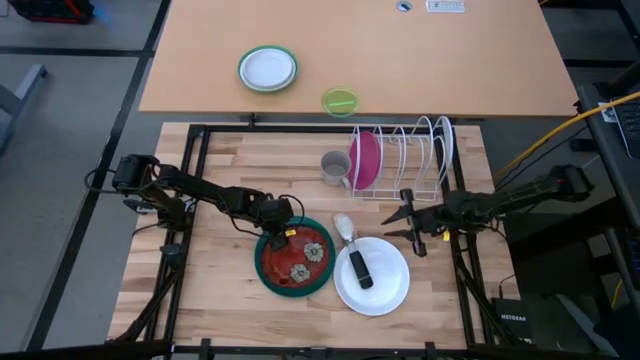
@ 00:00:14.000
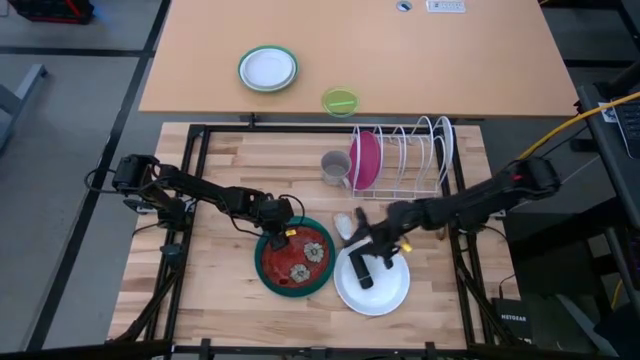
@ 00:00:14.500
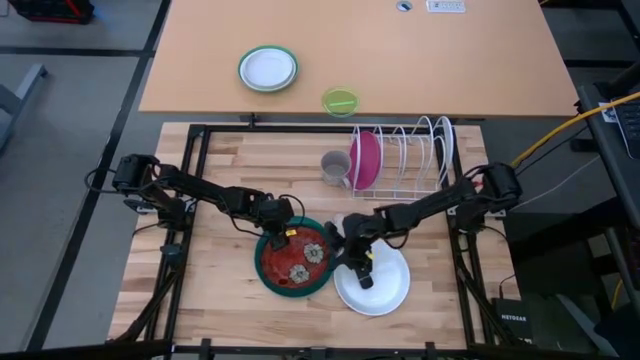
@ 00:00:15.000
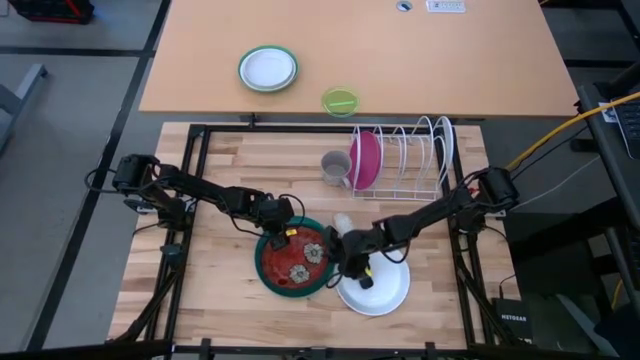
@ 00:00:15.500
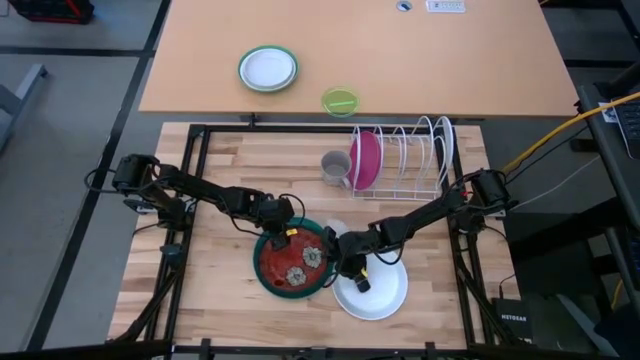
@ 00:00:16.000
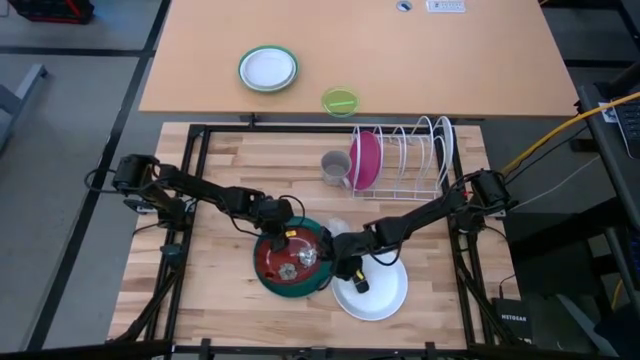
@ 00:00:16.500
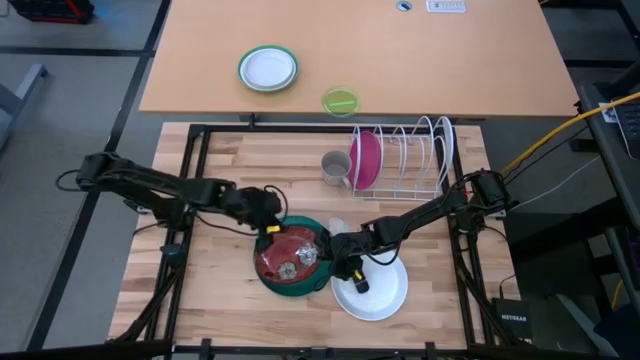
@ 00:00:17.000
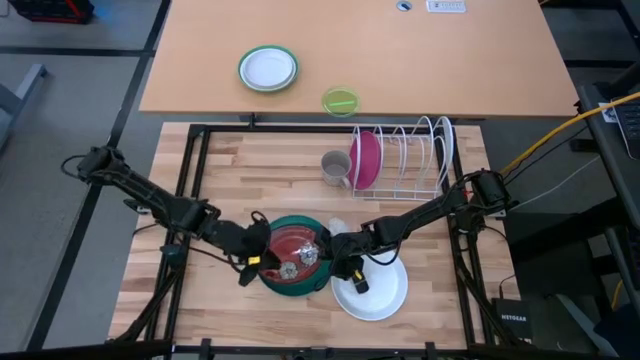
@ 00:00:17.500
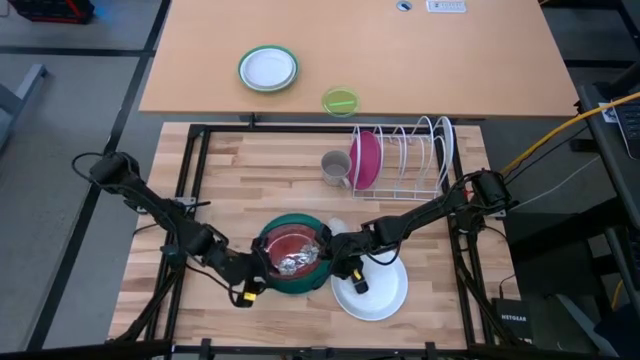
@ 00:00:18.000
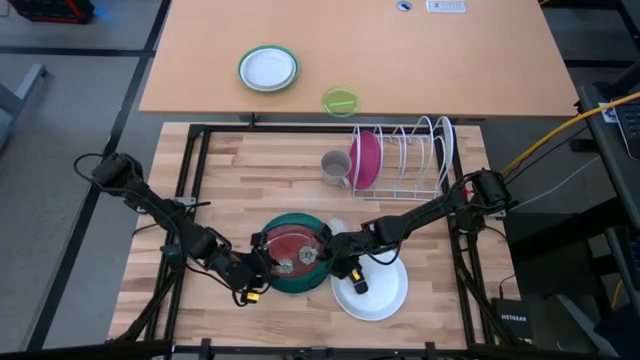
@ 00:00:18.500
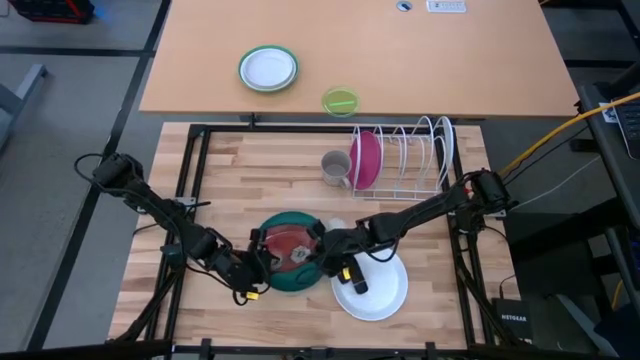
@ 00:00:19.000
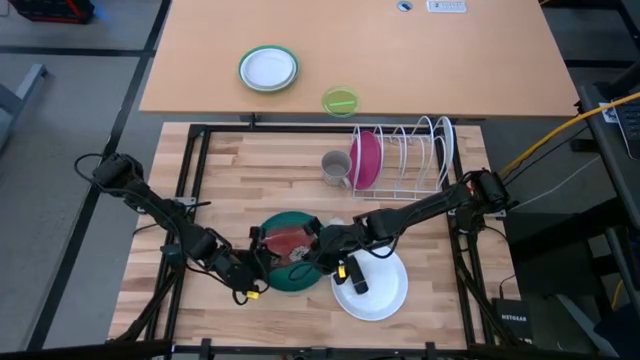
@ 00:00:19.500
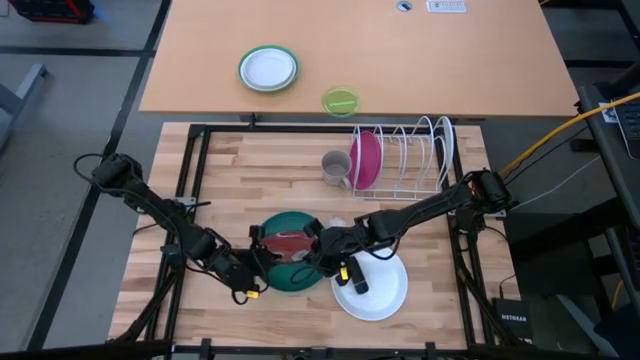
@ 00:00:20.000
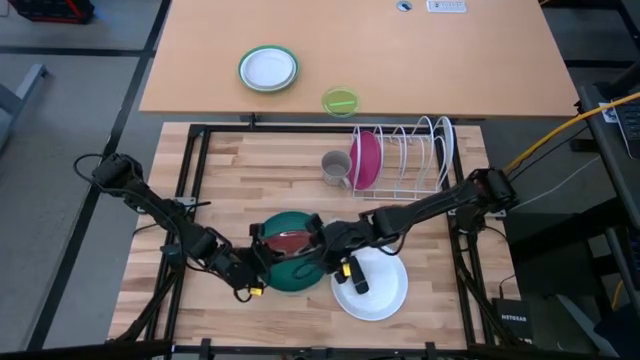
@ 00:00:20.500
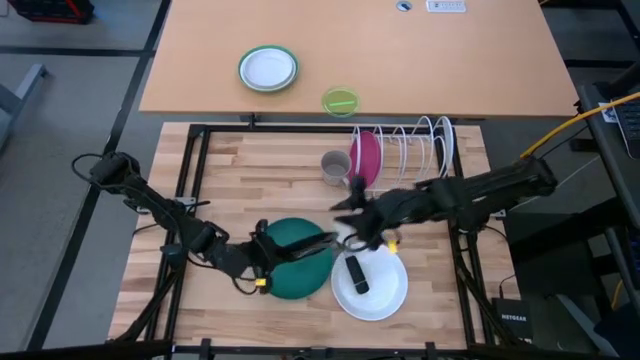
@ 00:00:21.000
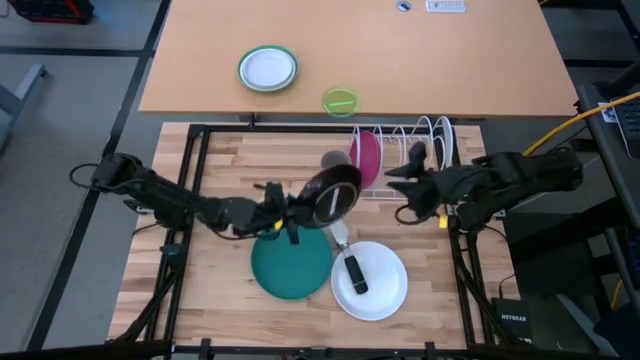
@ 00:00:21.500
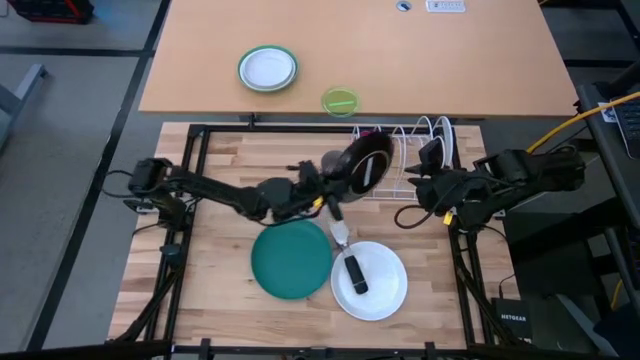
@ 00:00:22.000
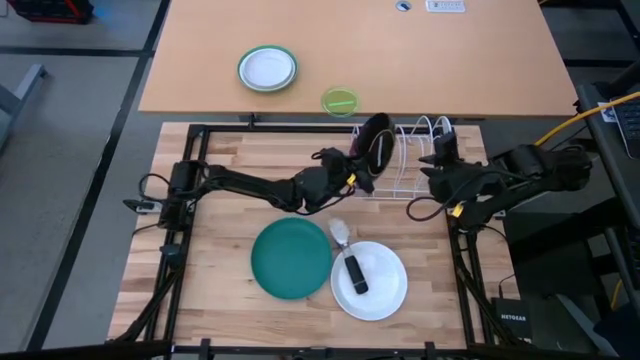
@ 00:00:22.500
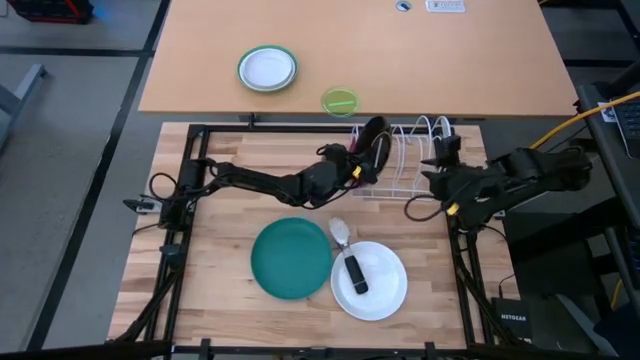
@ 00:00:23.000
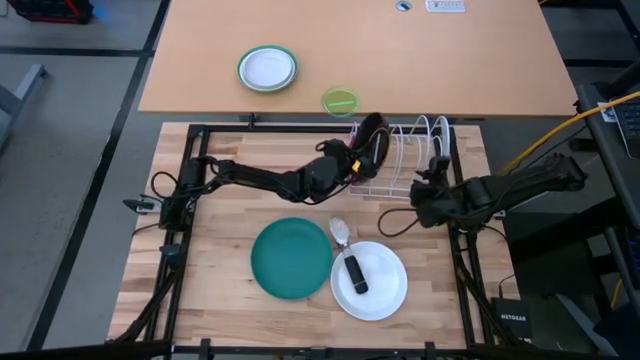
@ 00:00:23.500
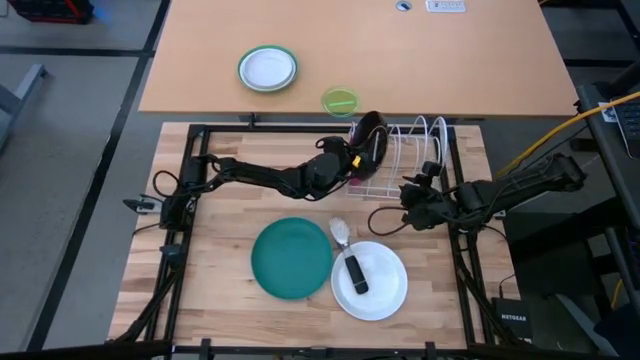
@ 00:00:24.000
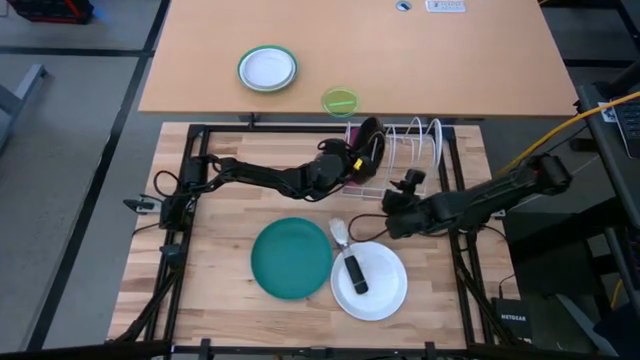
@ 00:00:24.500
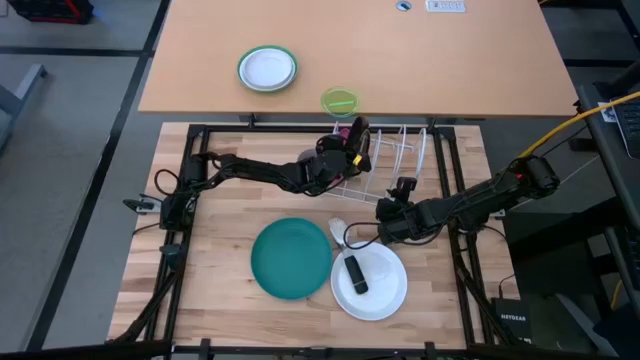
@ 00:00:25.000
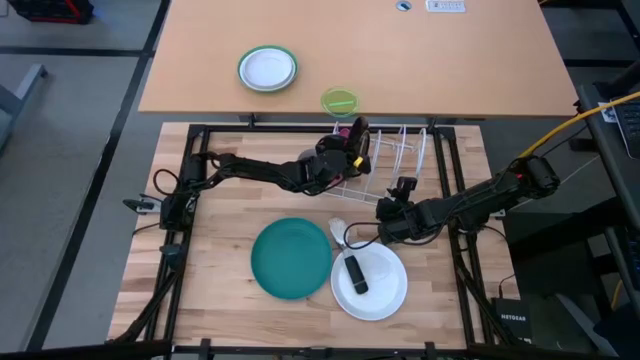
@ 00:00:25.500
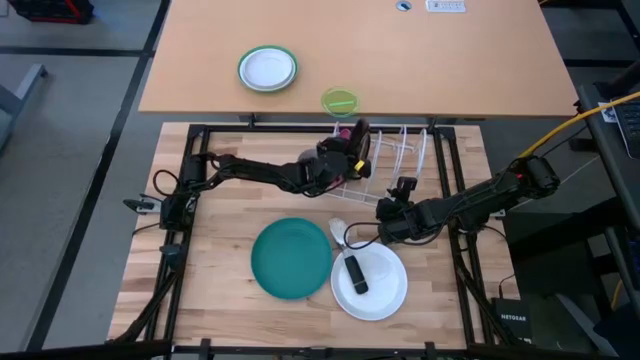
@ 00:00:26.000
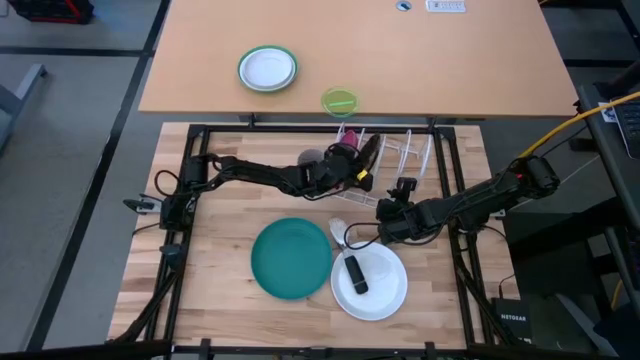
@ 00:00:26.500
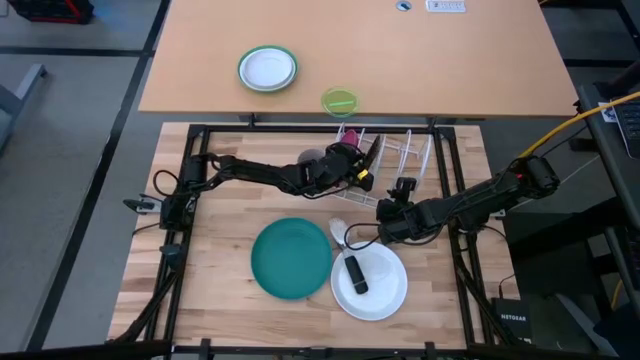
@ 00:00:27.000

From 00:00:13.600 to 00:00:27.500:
Task: Sort dishes
Put the brown plate in the white dish rack

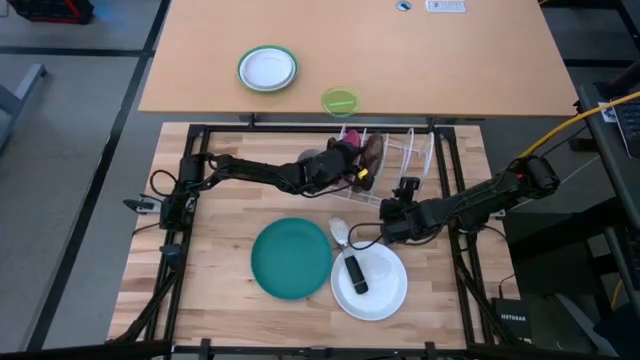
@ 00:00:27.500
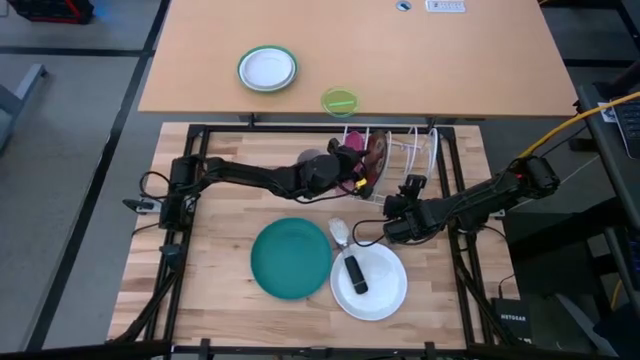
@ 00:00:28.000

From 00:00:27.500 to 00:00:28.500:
Adjust the white dish rack

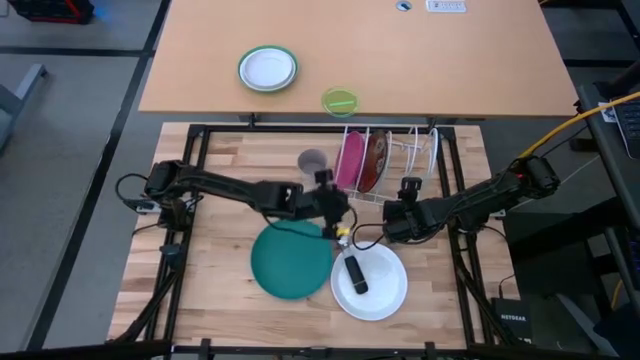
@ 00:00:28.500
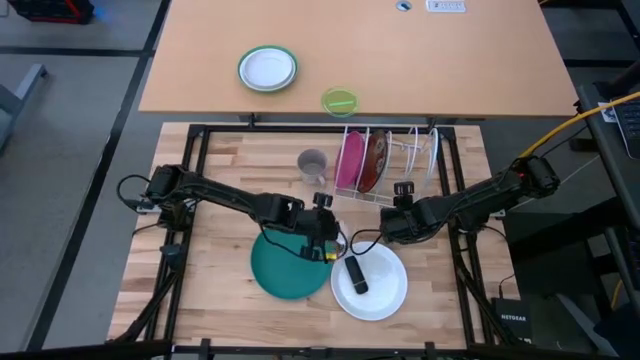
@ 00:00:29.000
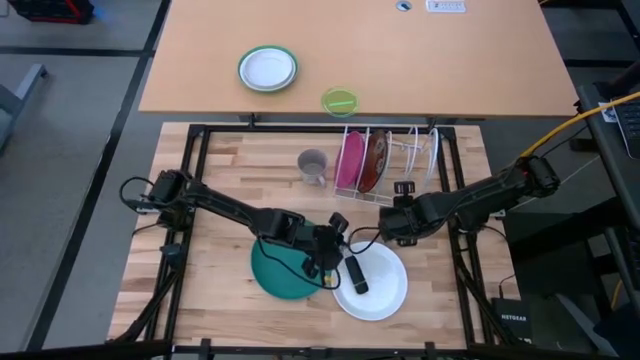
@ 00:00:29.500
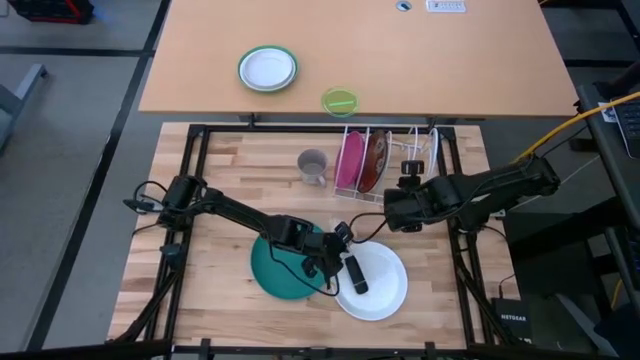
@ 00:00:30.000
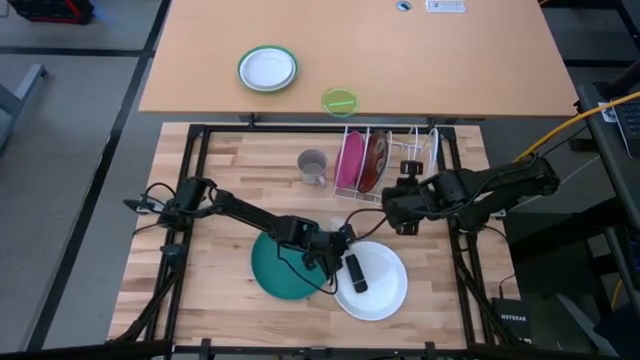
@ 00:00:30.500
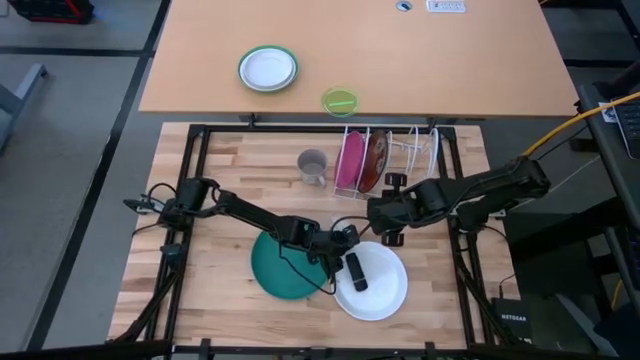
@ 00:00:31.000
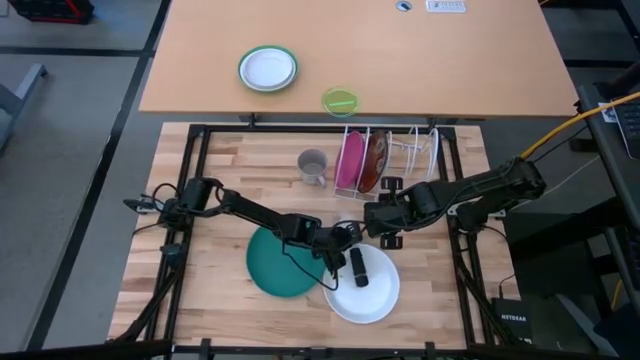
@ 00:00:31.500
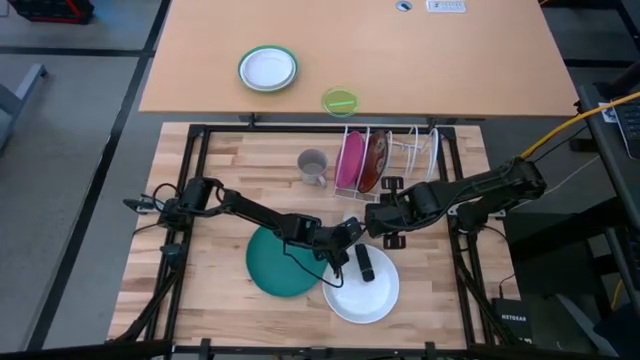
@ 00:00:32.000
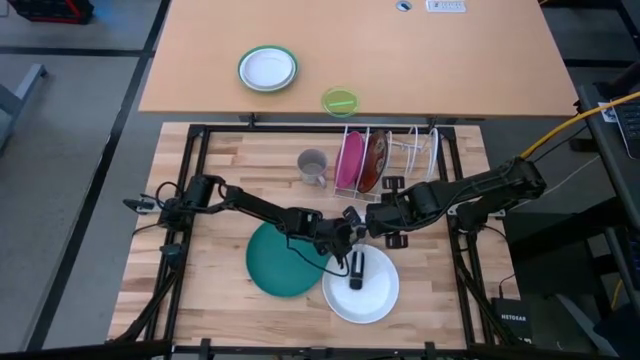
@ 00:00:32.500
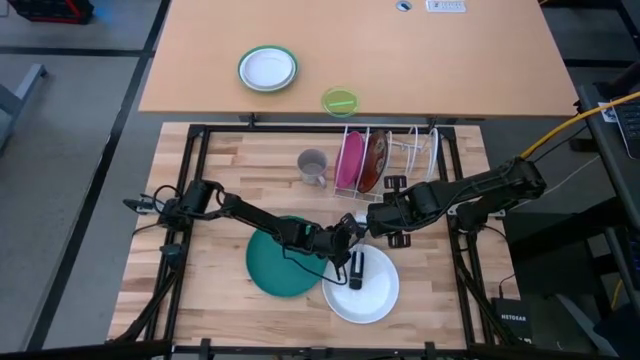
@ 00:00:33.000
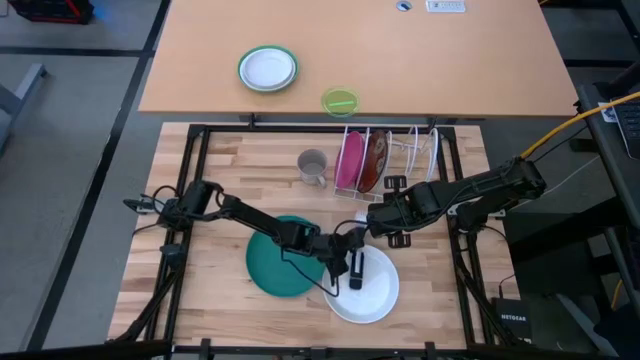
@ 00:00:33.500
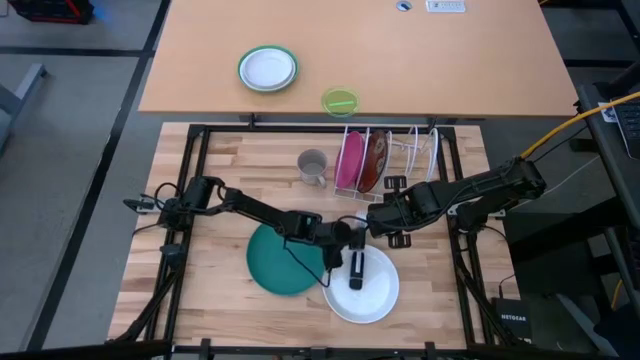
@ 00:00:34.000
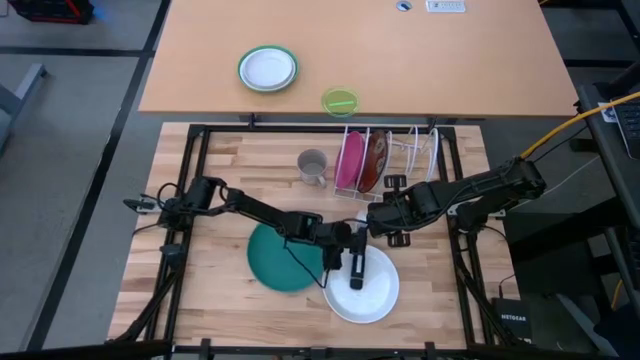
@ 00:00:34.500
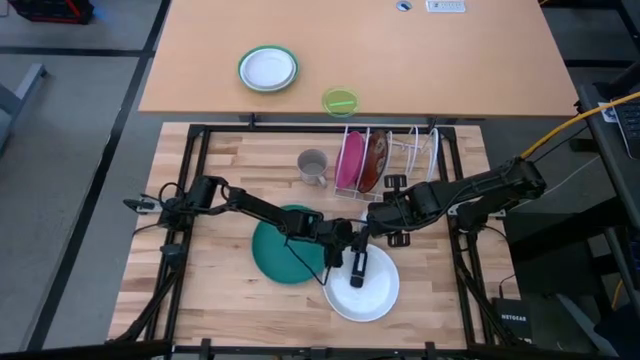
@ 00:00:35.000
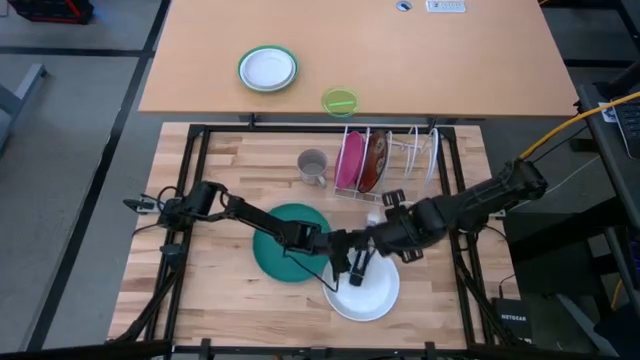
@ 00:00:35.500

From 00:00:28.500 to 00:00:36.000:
Move the black dish brush to the top left of the table
